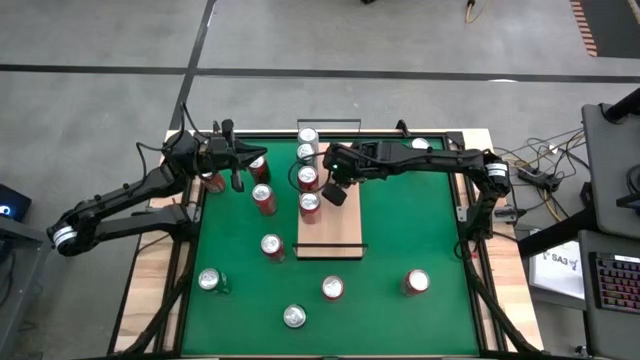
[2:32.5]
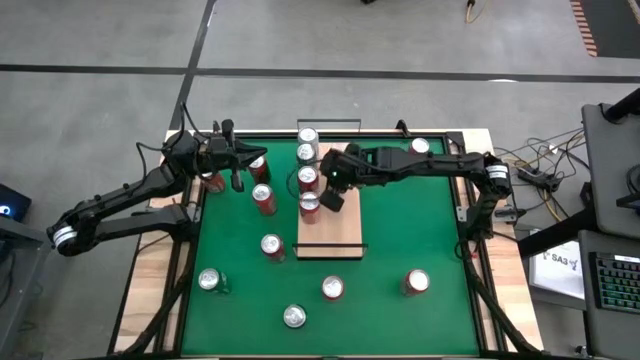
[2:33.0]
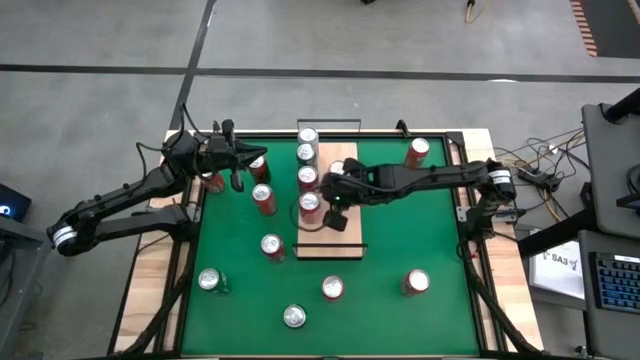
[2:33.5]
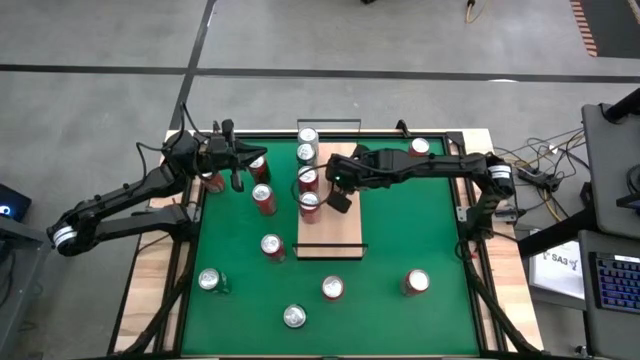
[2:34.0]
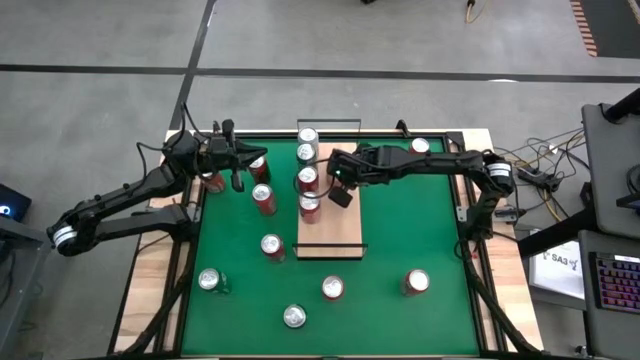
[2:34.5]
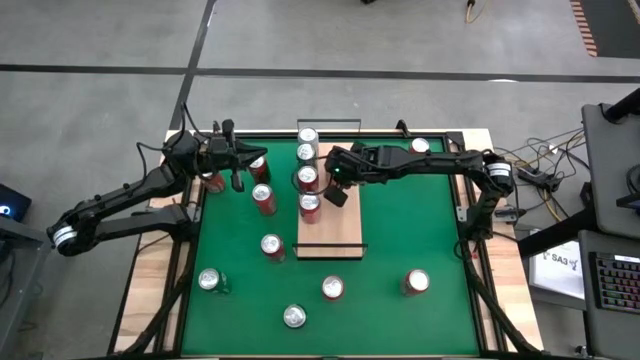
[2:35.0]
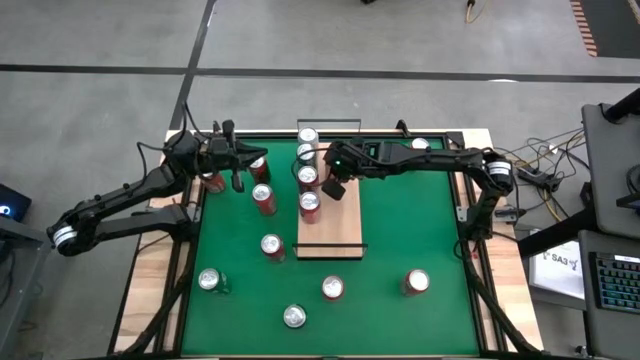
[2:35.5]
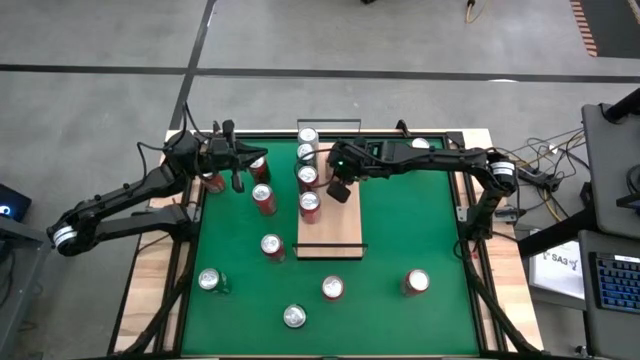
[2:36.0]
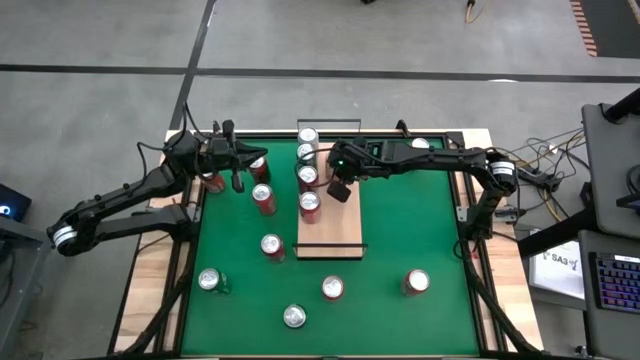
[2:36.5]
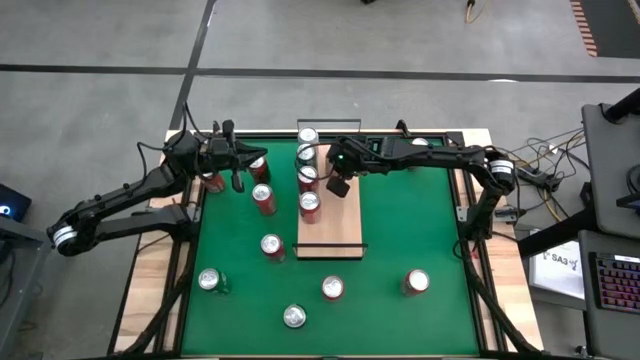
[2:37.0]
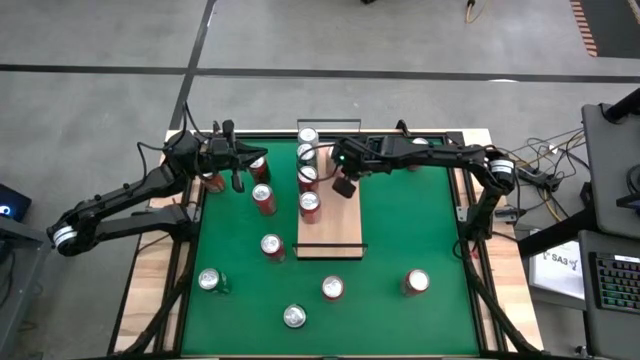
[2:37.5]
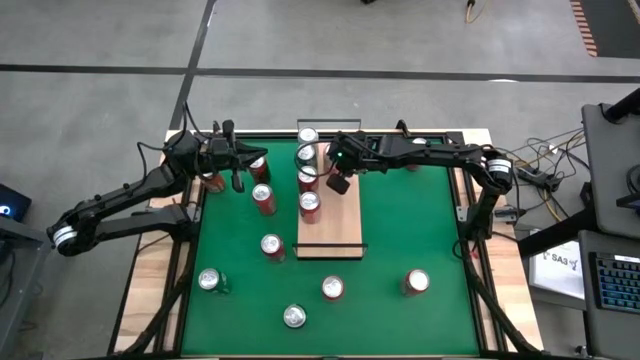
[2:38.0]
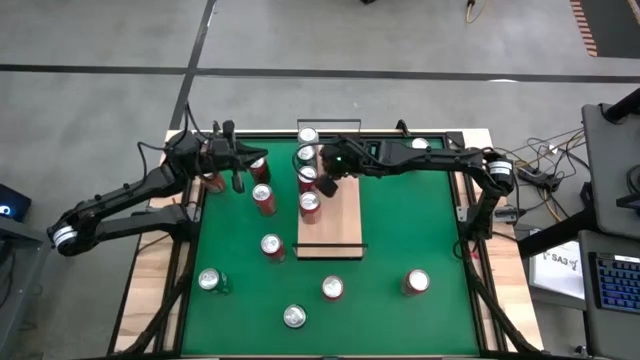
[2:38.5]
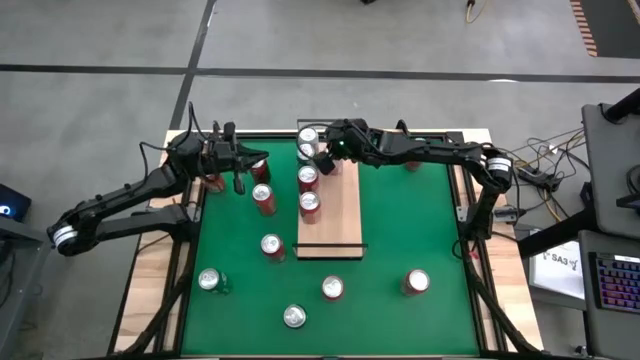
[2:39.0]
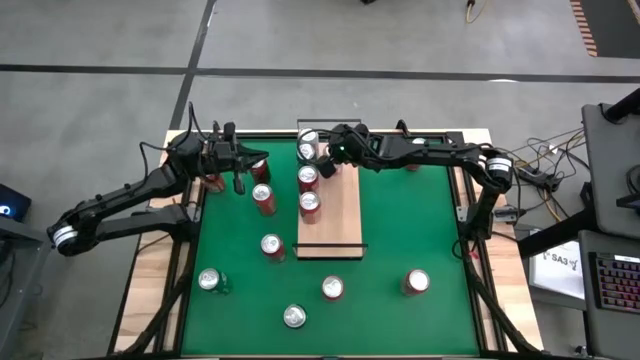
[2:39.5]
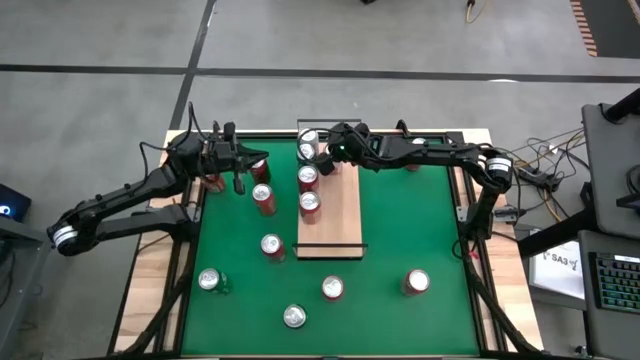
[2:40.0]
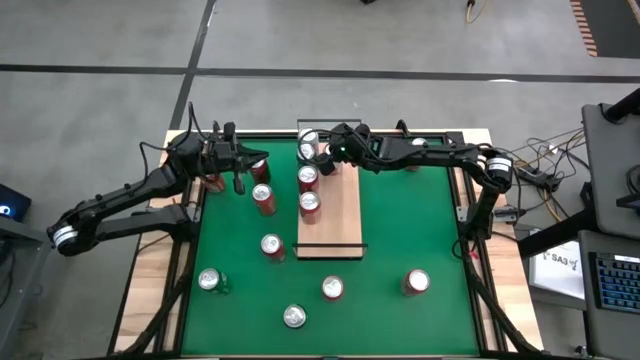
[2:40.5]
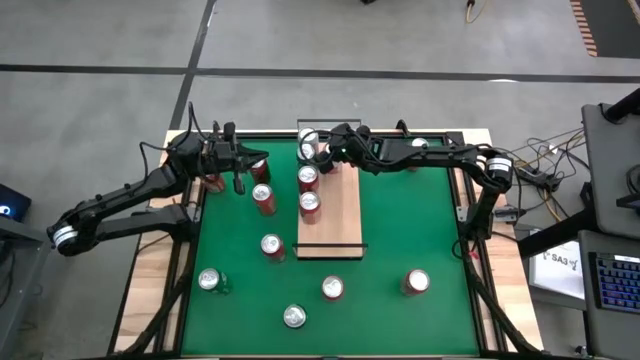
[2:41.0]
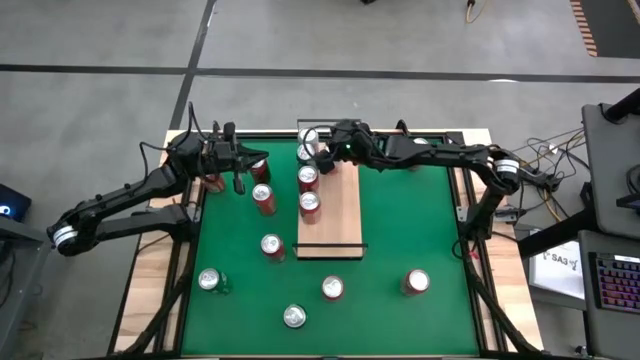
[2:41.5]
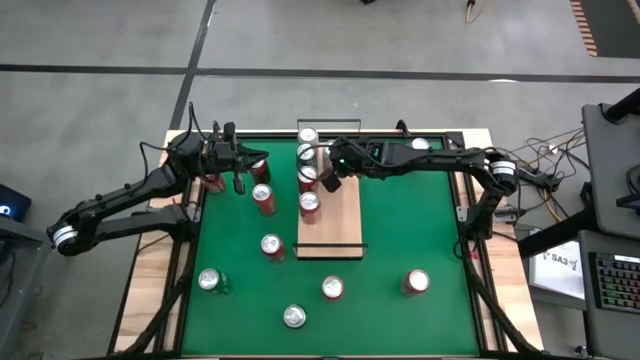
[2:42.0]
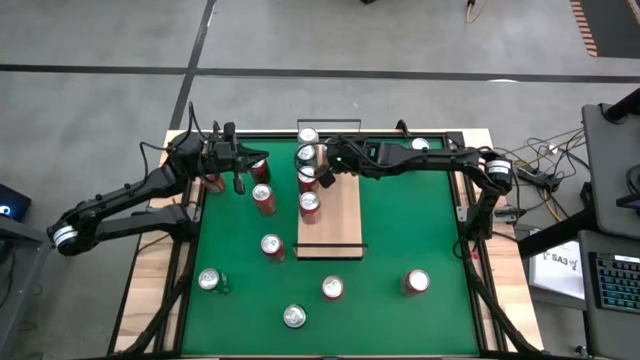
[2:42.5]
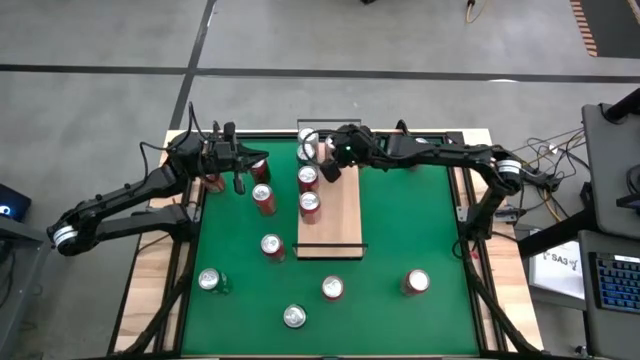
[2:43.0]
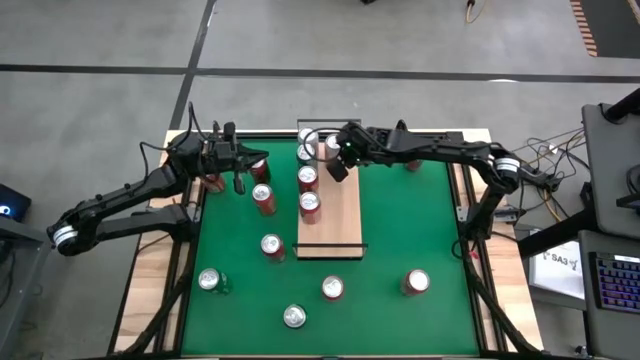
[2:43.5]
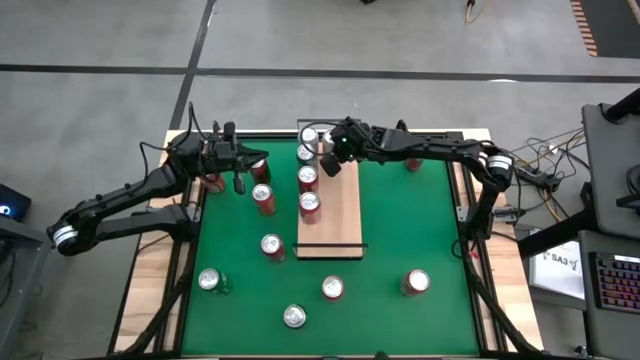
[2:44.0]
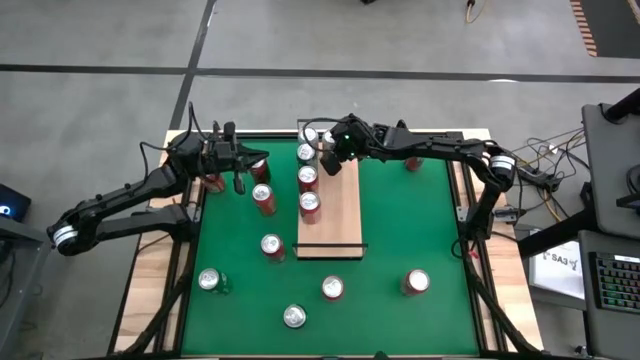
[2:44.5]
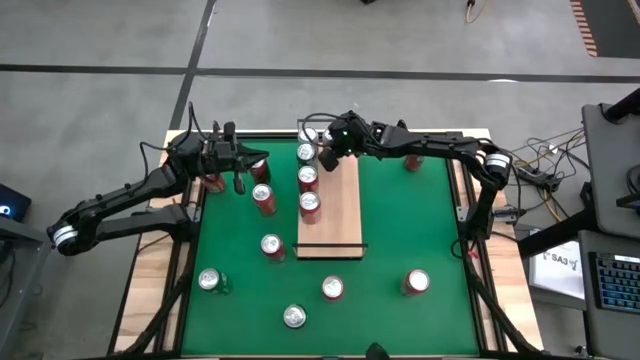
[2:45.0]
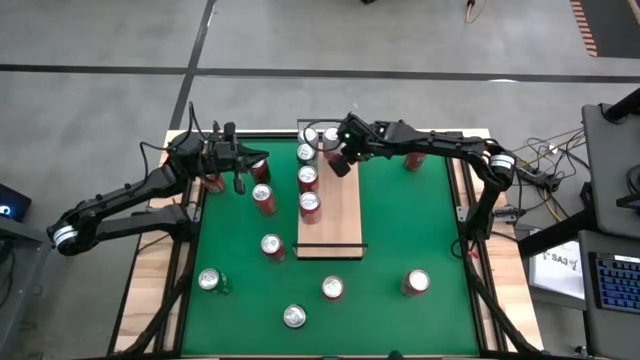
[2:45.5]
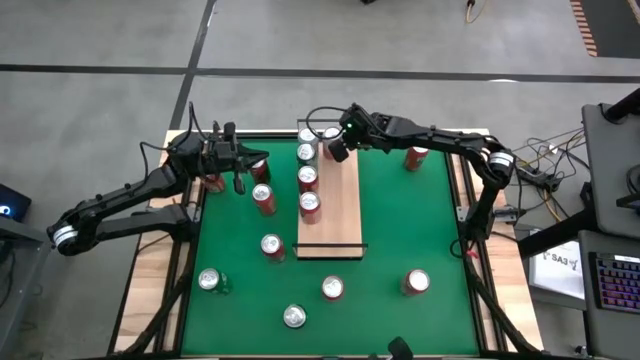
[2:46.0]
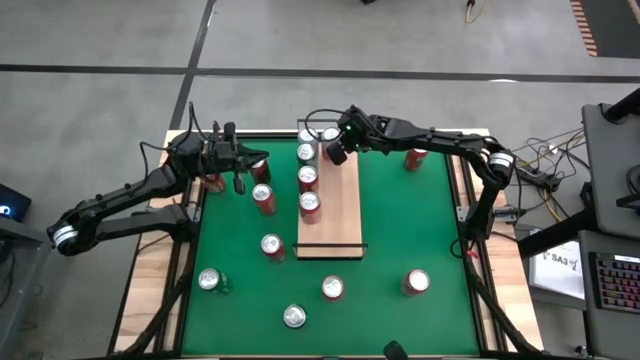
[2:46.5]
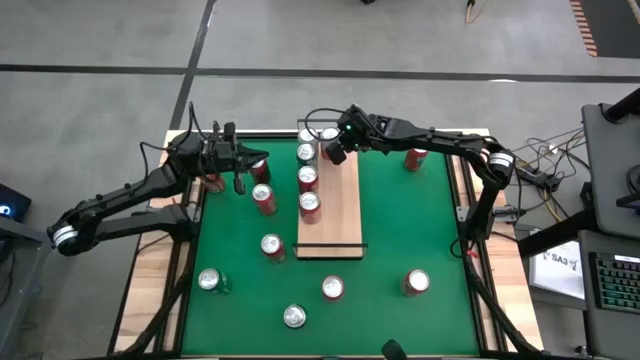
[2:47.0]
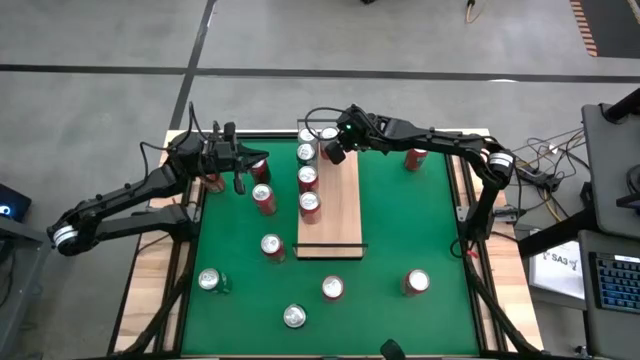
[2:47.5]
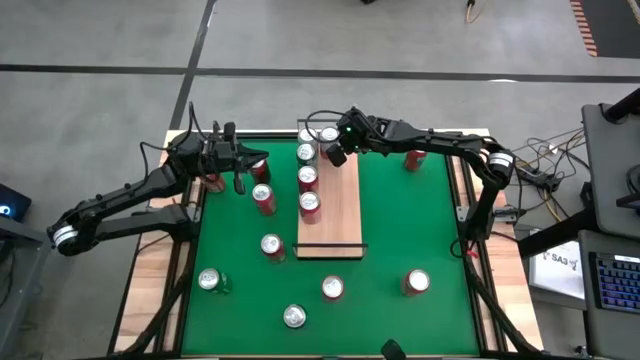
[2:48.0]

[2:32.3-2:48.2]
Task: Place canned beverage on shelf
Put the white/pink soda can on the shelf and aligned with the other white/pink soda can

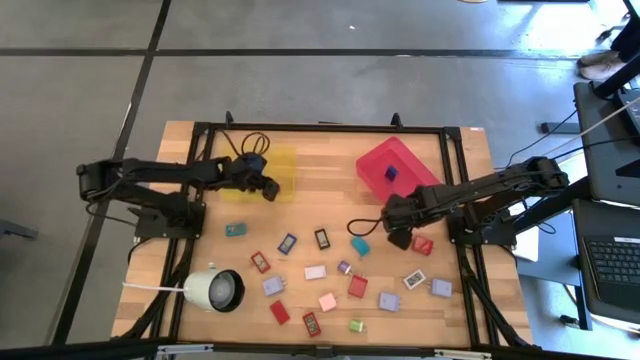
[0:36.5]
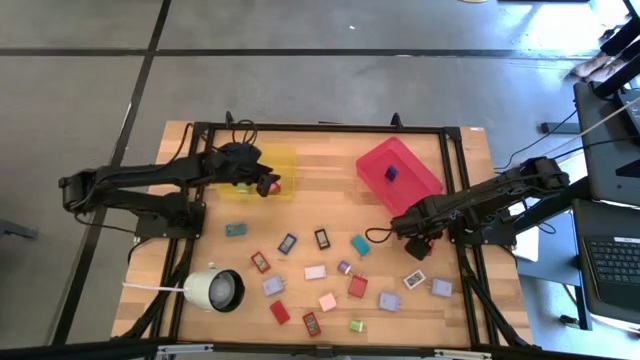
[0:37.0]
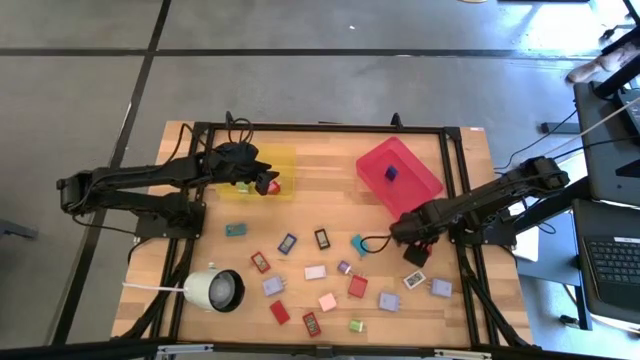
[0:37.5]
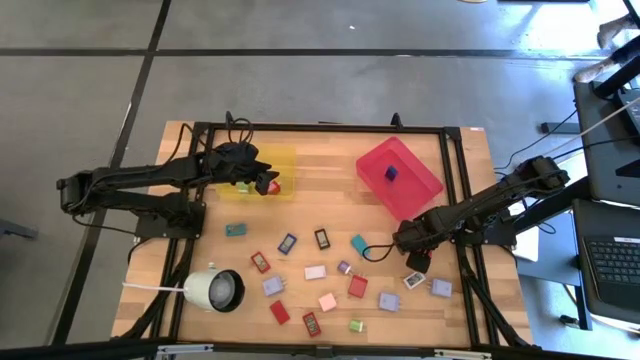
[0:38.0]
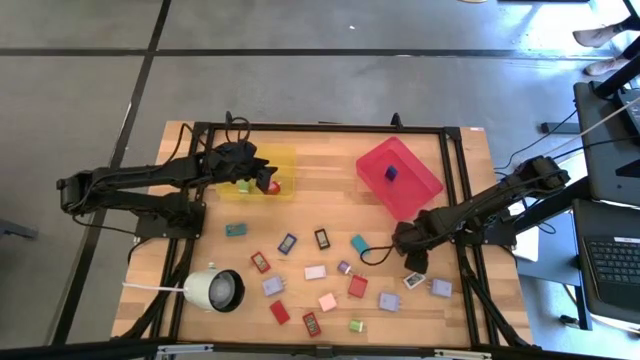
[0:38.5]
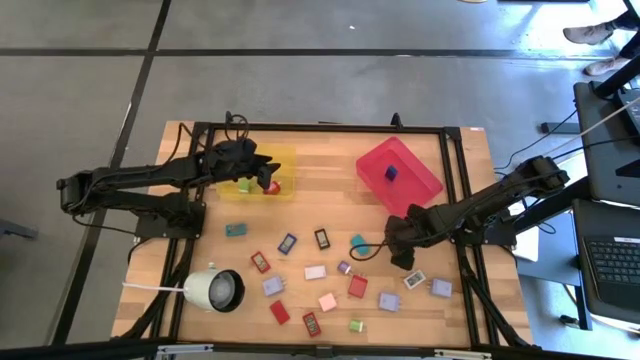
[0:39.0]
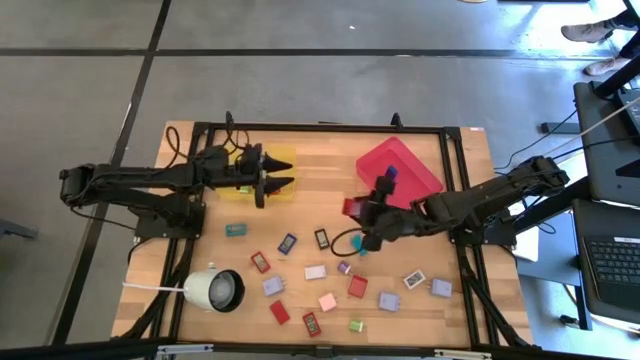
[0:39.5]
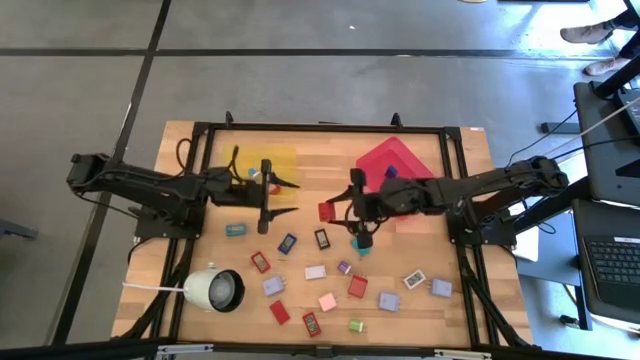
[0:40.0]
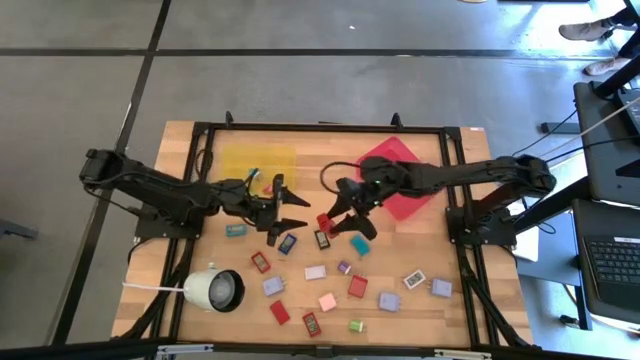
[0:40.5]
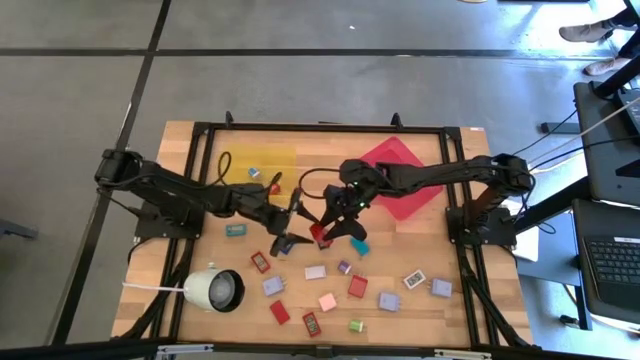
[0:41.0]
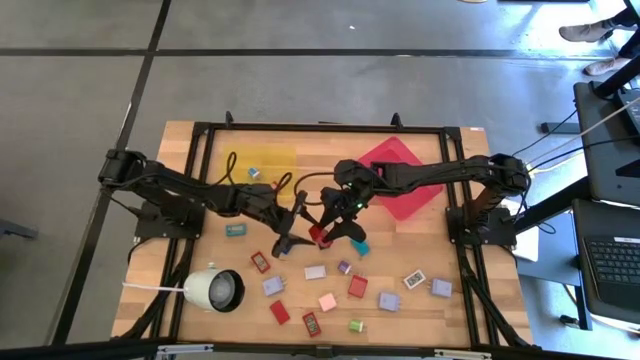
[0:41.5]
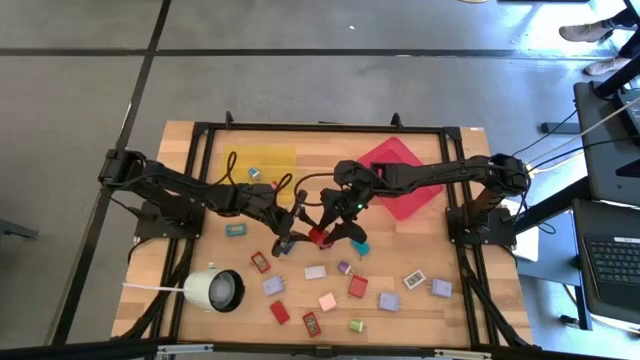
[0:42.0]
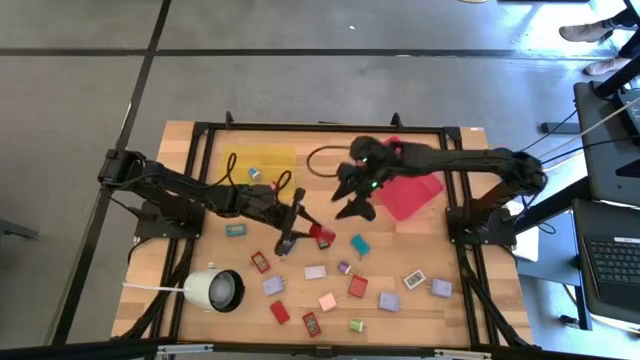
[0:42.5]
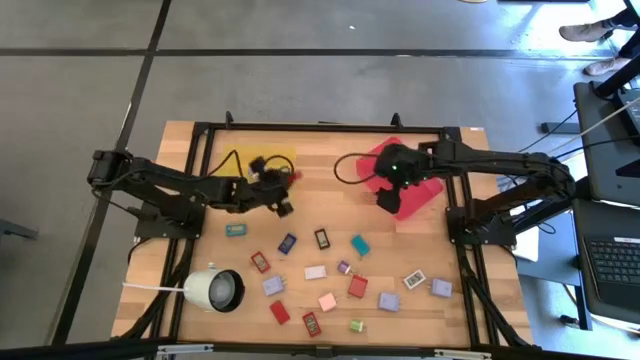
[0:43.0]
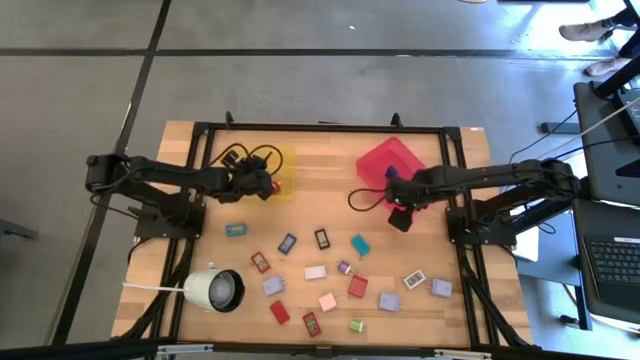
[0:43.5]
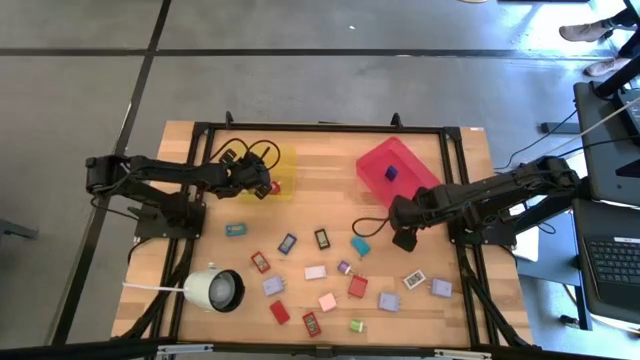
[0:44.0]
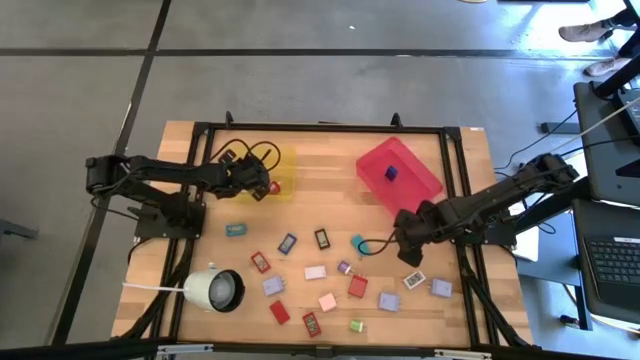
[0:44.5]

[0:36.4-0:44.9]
Task: Pick & Place Office items
Put the top red charger adapter into the yellow bin
